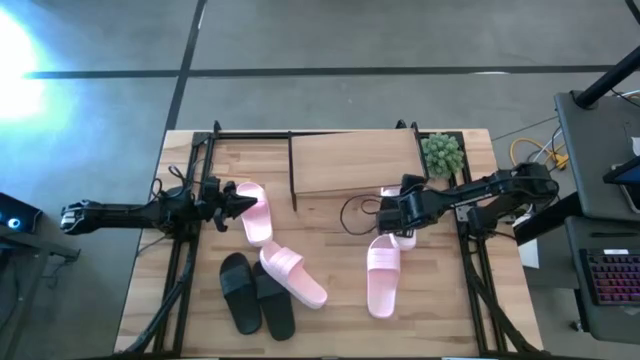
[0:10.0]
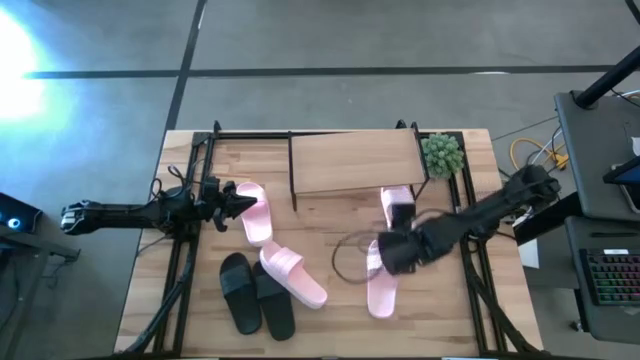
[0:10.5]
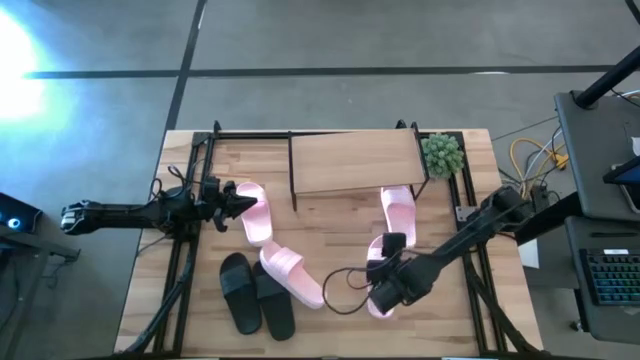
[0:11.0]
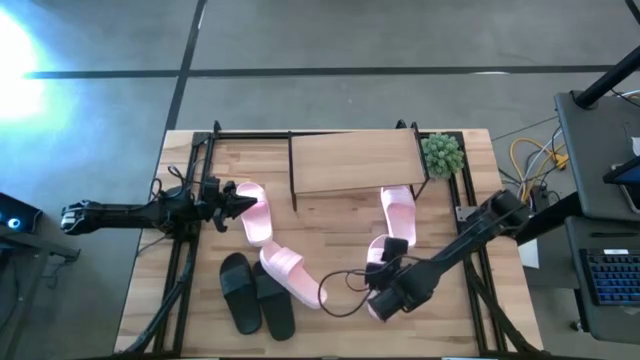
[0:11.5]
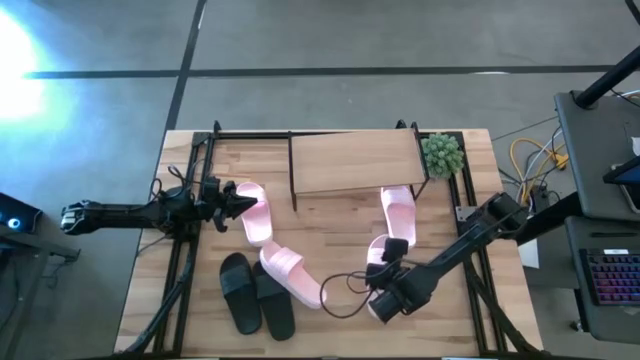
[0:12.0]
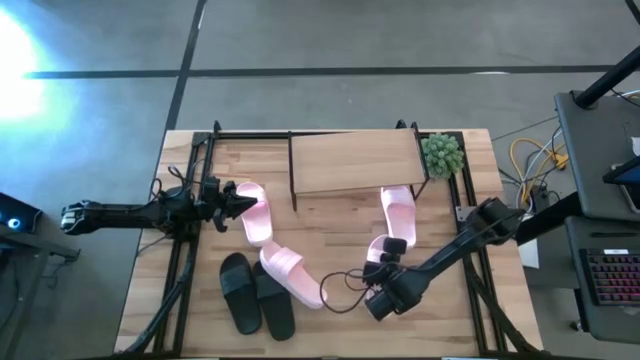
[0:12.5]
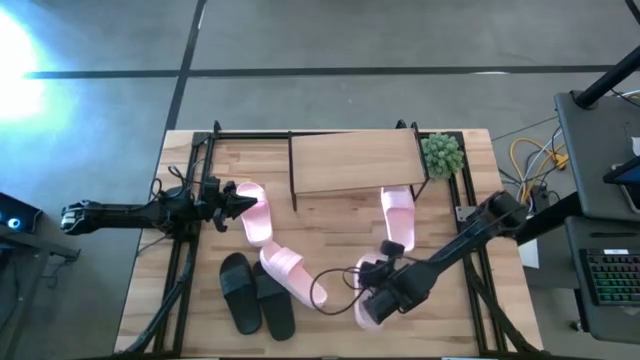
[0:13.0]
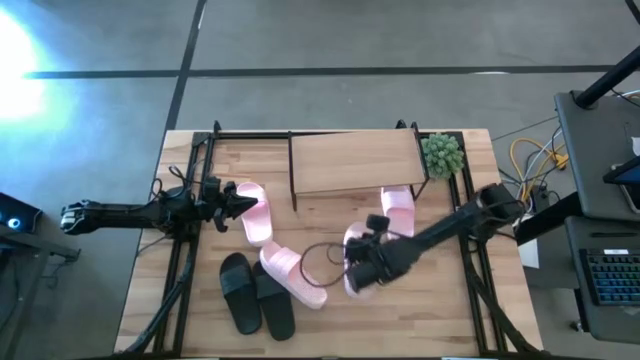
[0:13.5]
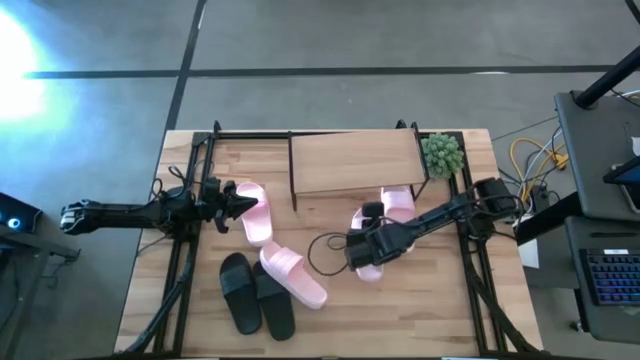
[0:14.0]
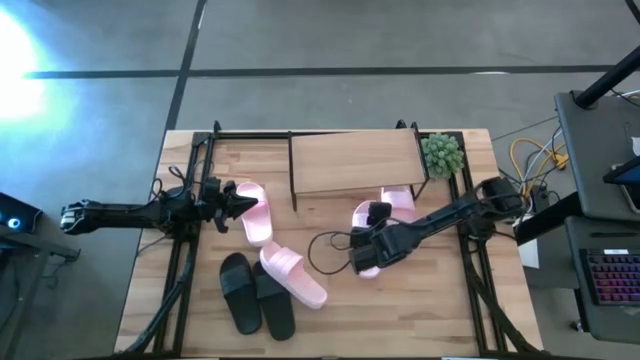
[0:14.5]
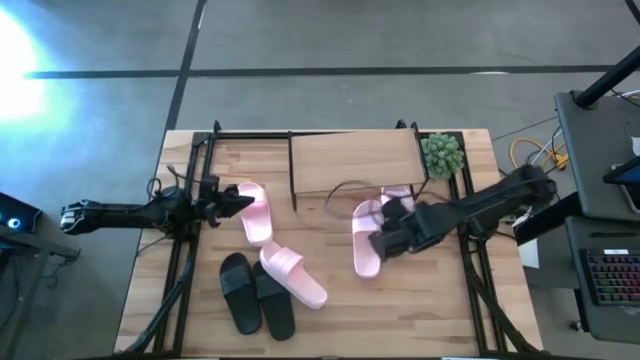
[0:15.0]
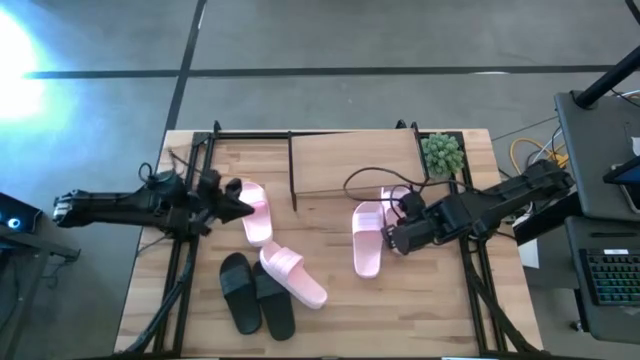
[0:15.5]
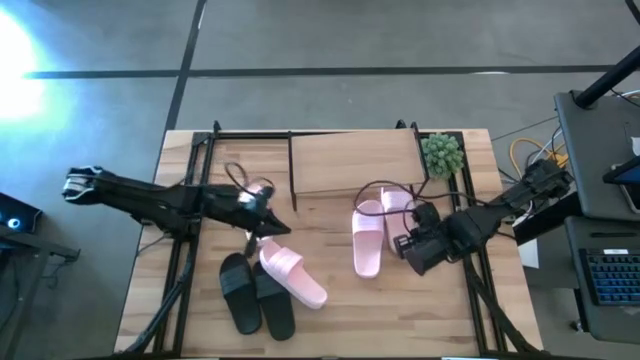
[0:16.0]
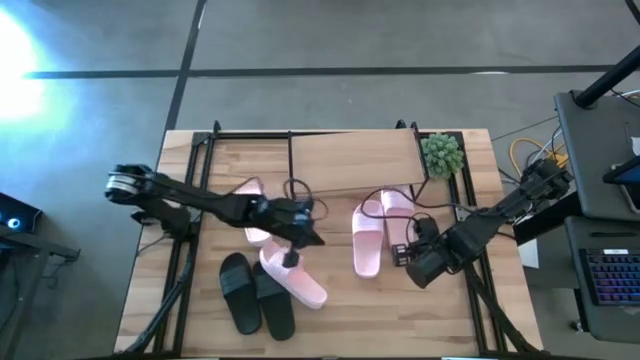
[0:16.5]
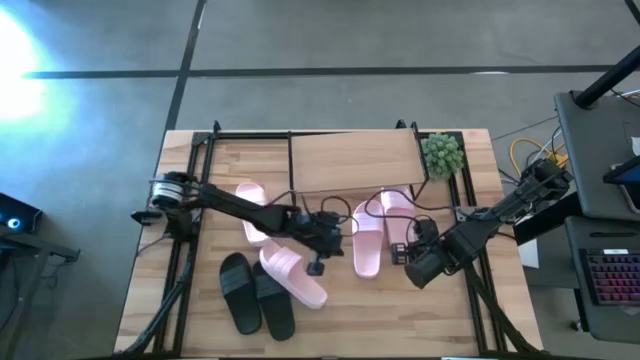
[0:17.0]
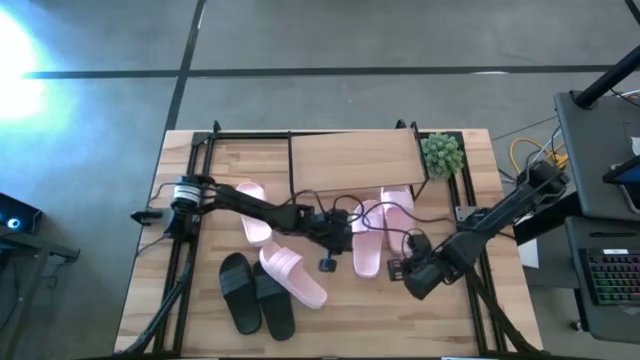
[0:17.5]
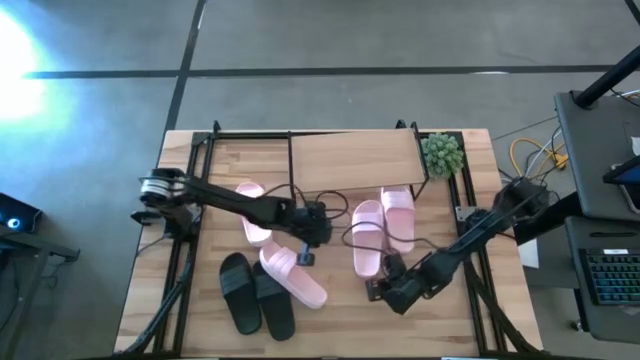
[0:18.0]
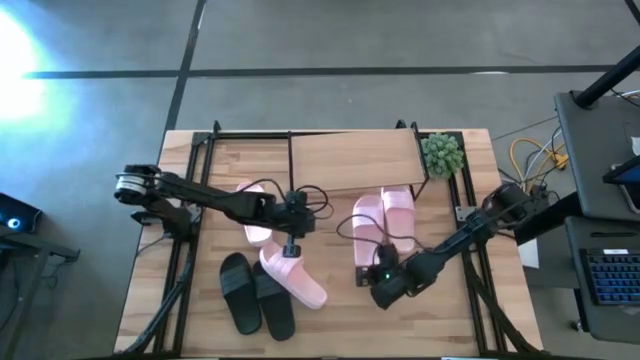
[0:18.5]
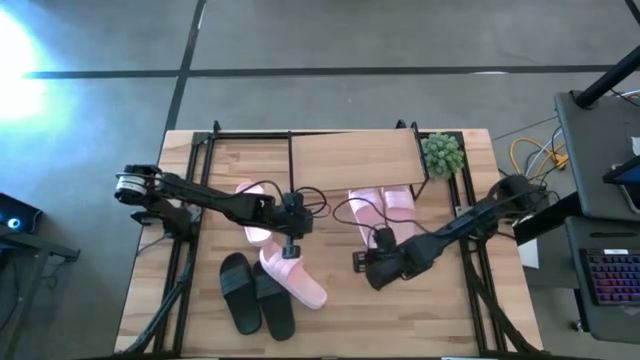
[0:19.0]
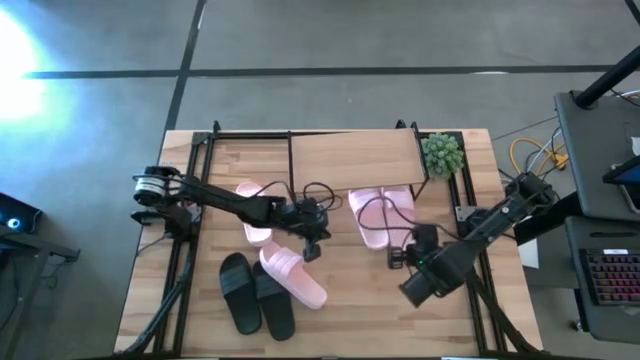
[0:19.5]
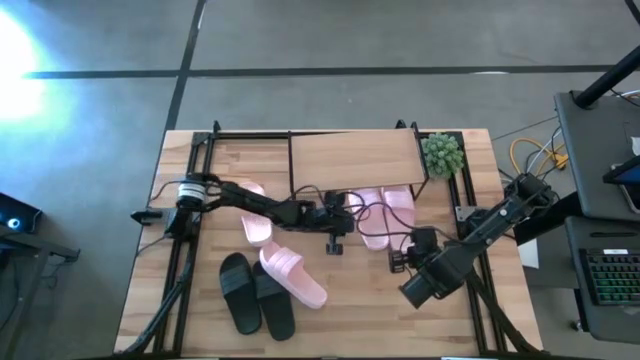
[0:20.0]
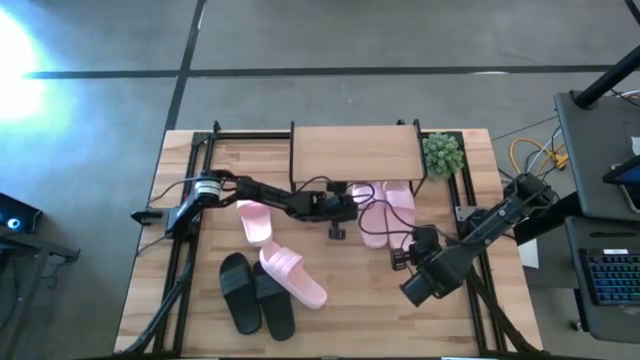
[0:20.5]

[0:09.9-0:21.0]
Task: Pick and place slides into the shelf
Put the pink slipper under the shelf

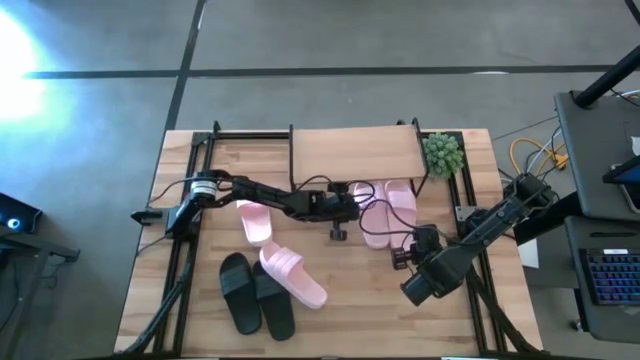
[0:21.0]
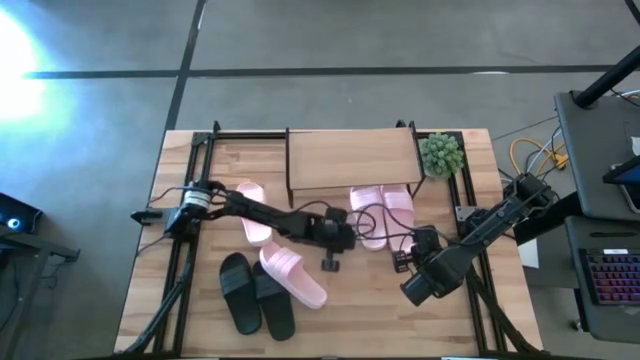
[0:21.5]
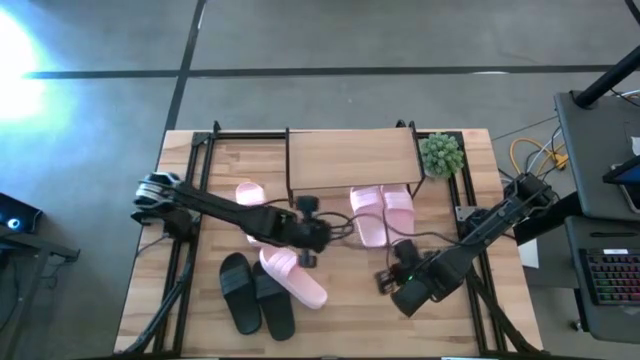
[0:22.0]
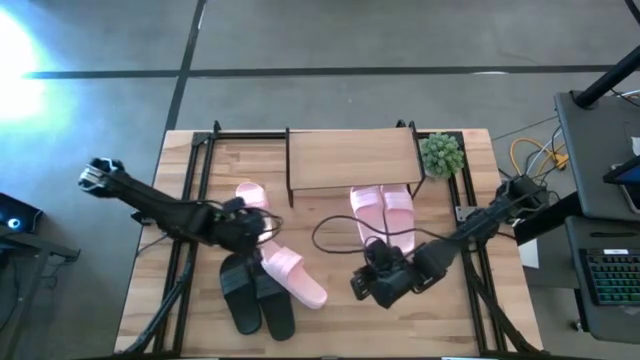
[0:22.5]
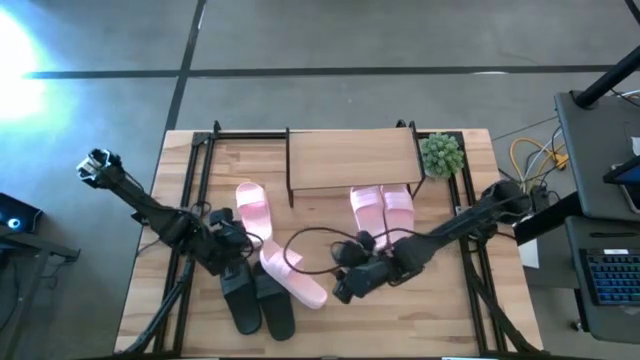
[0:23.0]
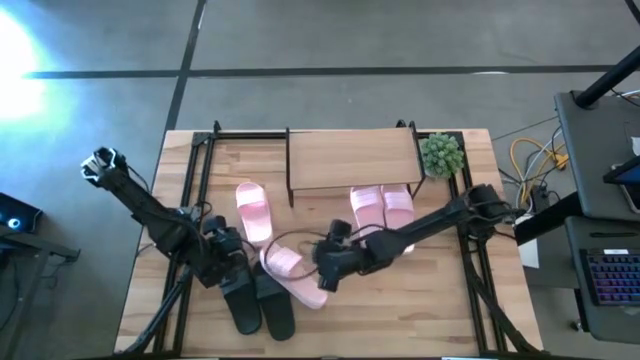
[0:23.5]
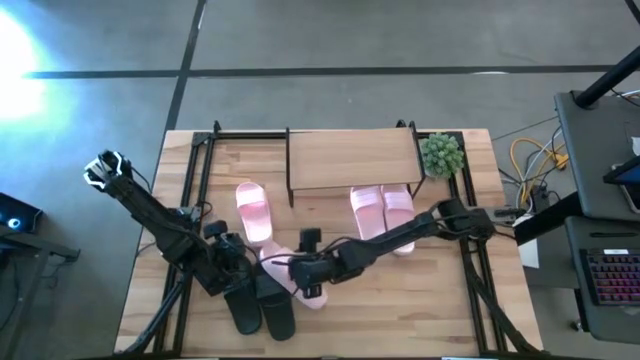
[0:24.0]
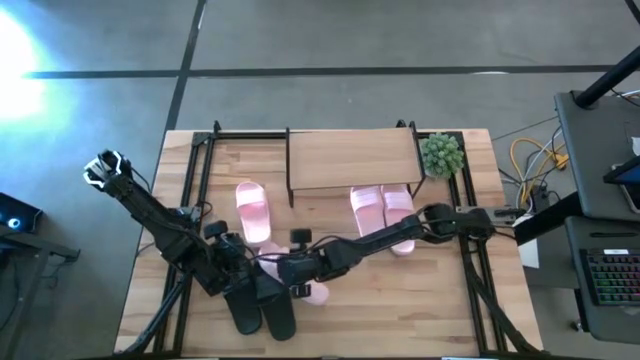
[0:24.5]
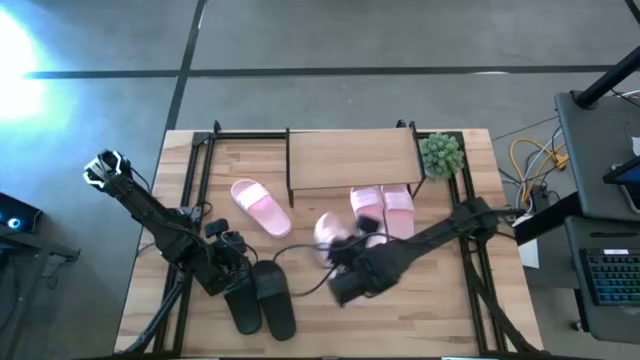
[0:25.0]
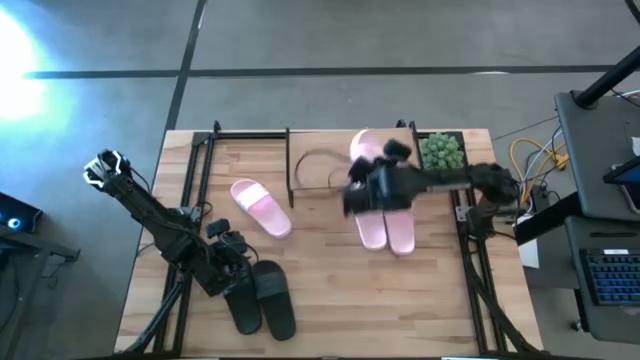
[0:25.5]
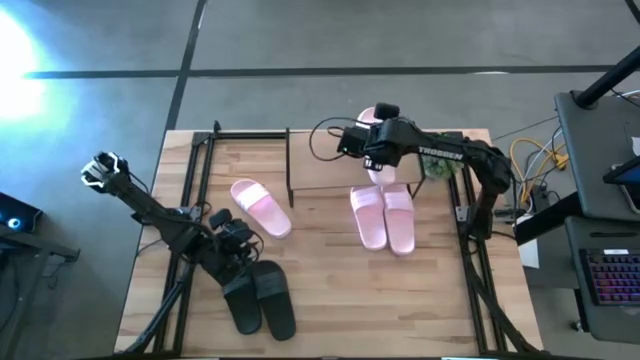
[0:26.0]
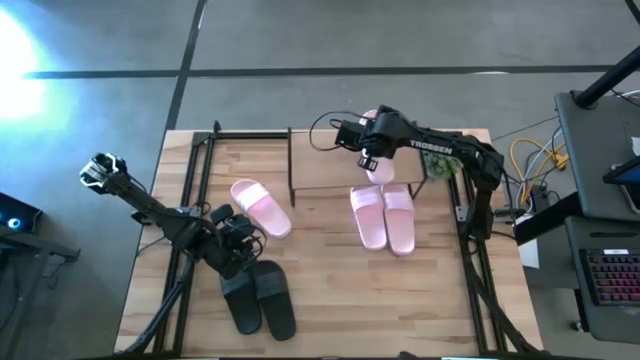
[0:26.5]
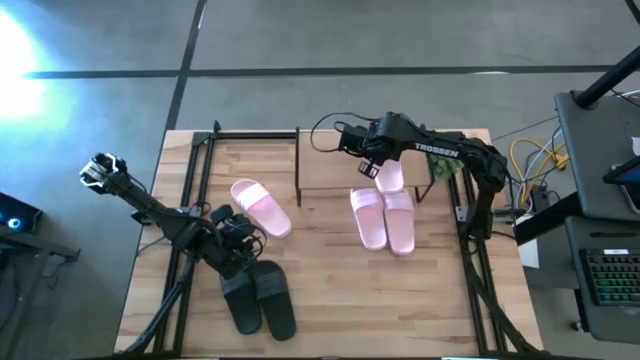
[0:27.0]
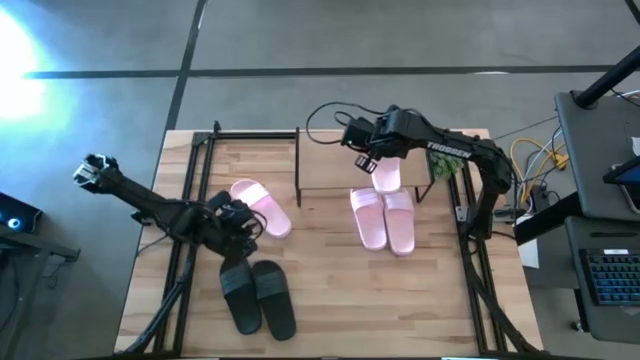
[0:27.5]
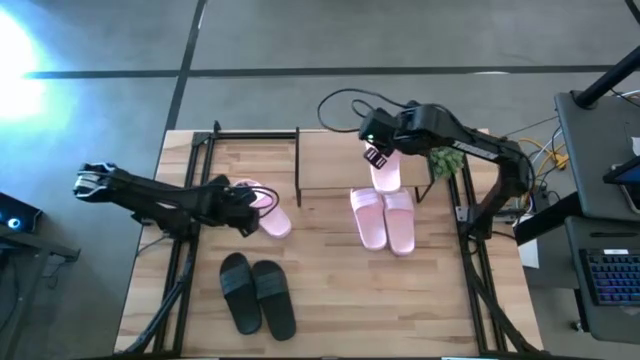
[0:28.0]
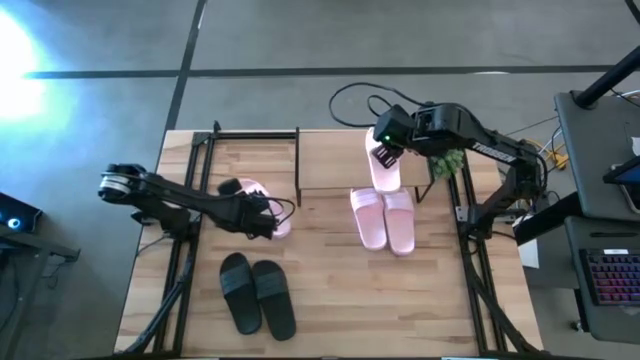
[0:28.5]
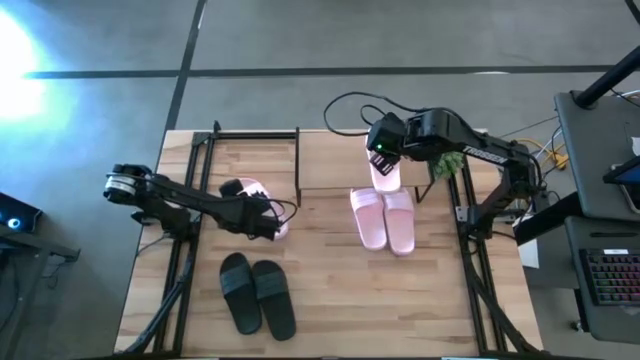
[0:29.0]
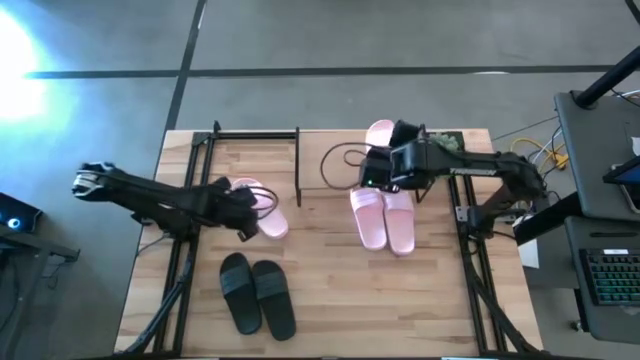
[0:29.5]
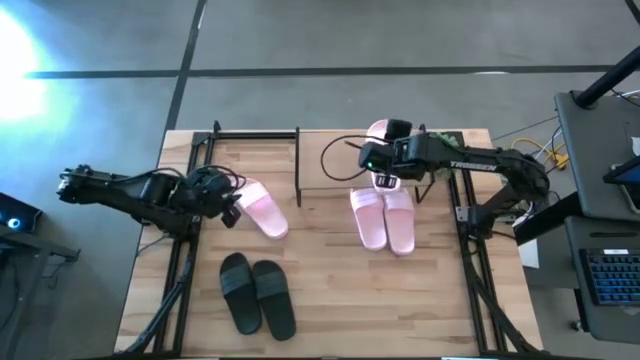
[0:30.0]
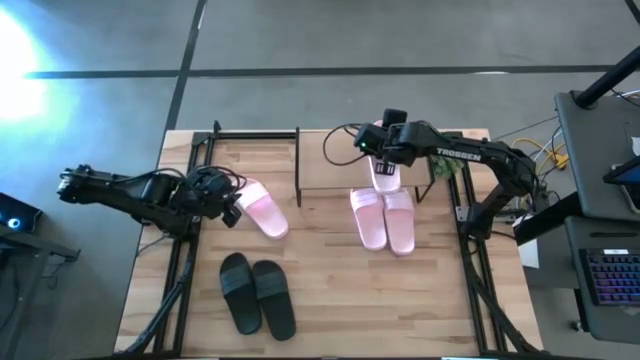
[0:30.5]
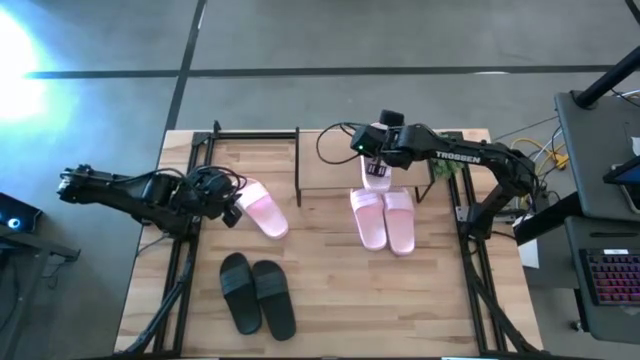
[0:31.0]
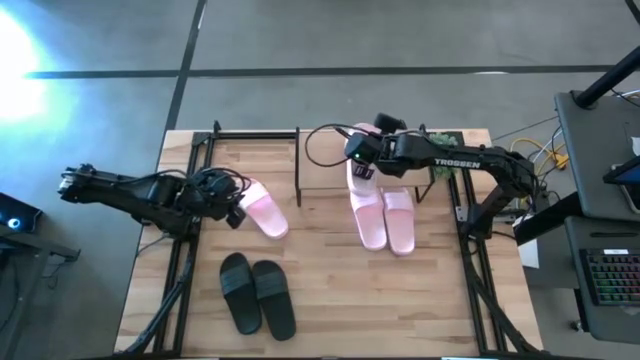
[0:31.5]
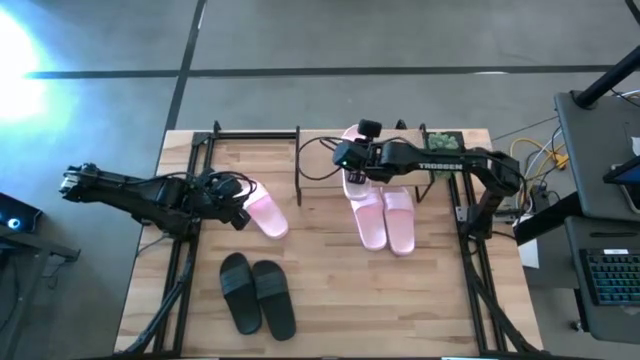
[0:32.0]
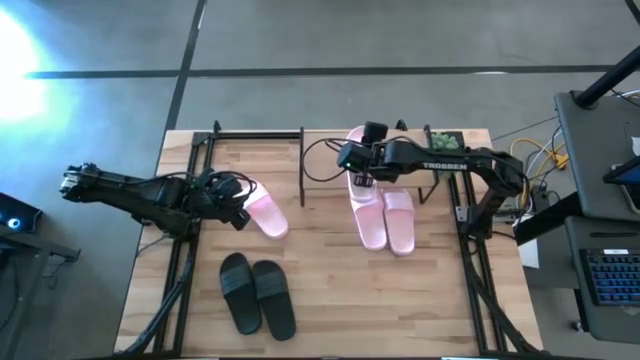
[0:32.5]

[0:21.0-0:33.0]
Put the pink slipper on the shelf
